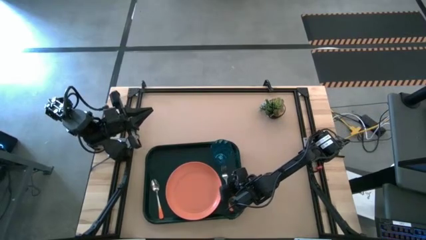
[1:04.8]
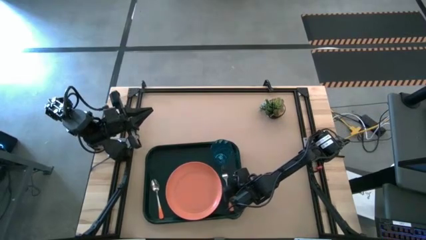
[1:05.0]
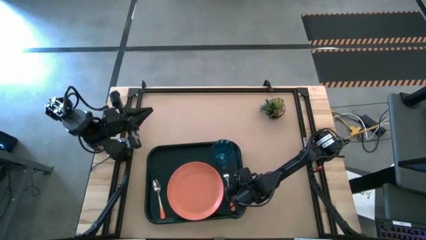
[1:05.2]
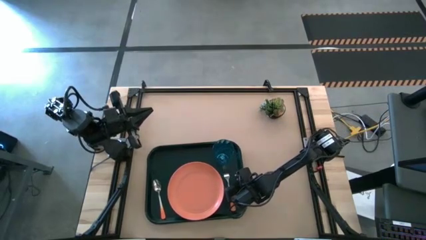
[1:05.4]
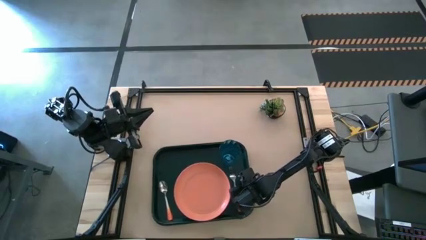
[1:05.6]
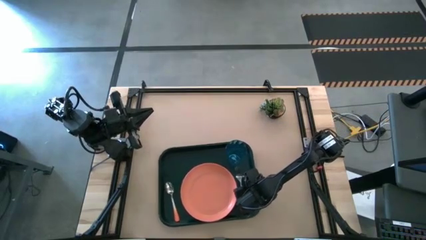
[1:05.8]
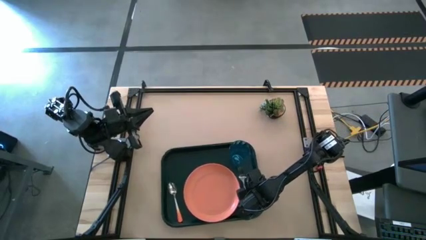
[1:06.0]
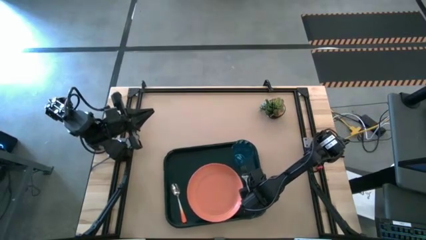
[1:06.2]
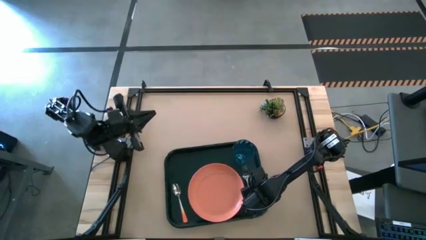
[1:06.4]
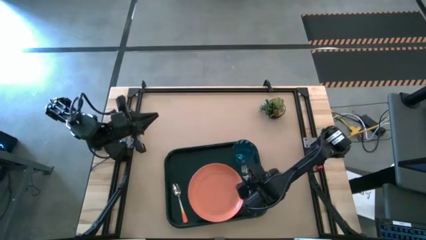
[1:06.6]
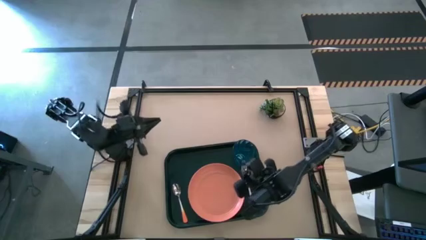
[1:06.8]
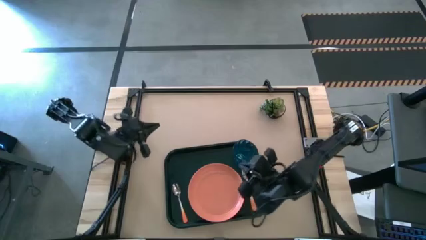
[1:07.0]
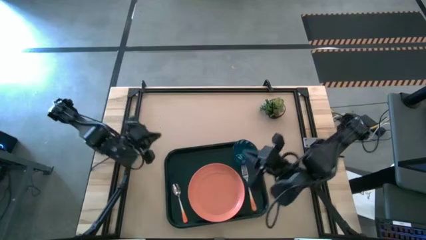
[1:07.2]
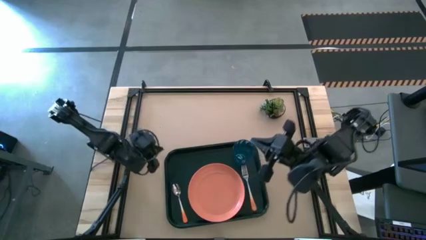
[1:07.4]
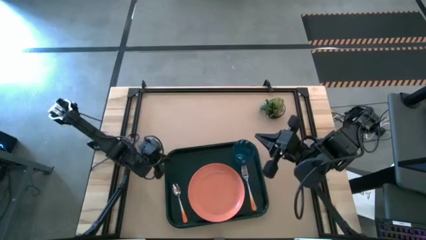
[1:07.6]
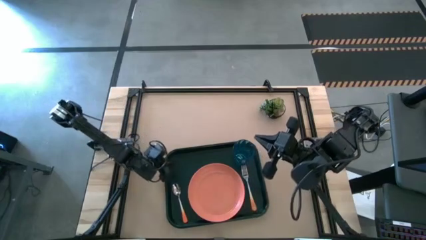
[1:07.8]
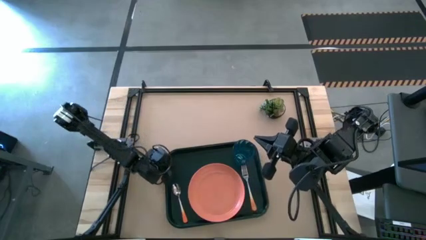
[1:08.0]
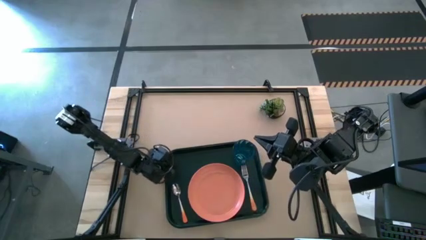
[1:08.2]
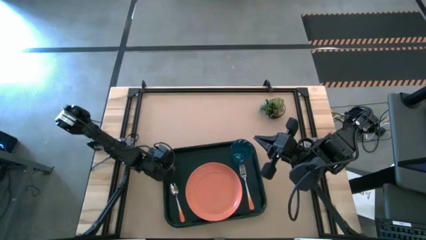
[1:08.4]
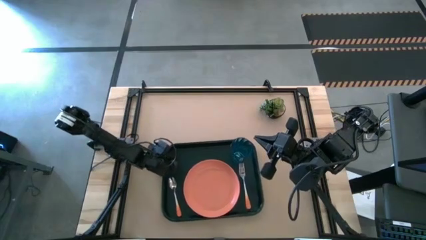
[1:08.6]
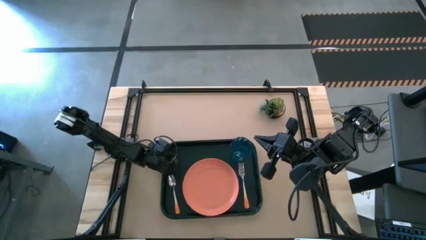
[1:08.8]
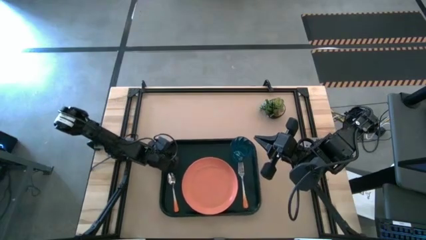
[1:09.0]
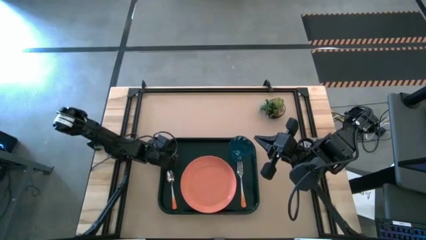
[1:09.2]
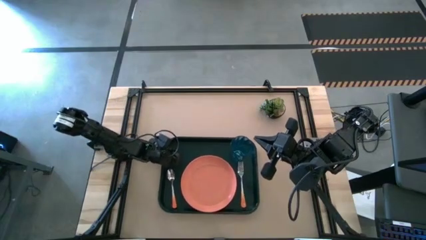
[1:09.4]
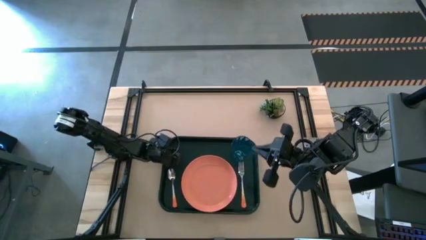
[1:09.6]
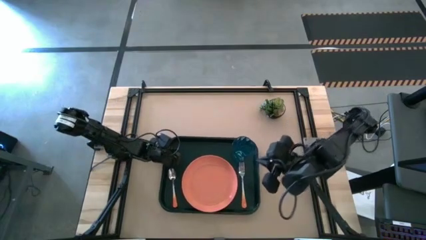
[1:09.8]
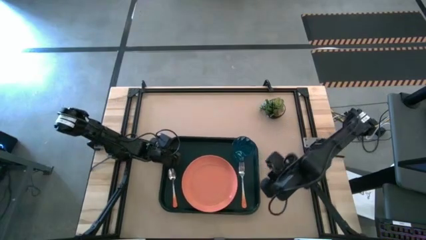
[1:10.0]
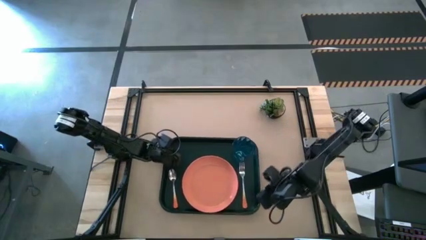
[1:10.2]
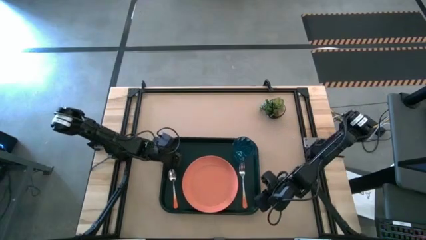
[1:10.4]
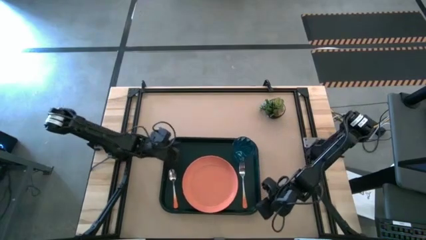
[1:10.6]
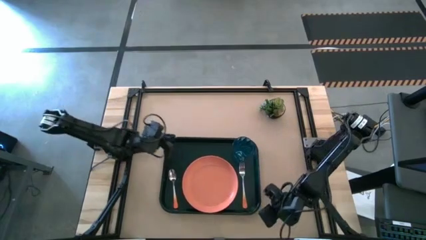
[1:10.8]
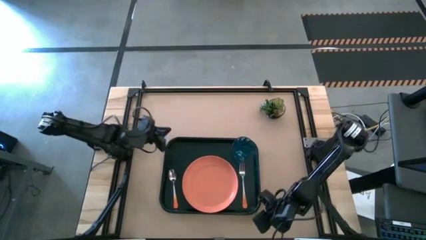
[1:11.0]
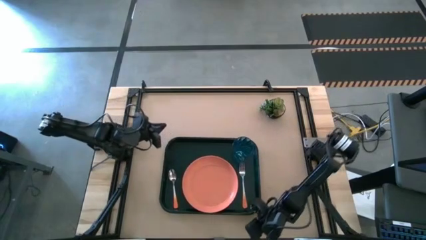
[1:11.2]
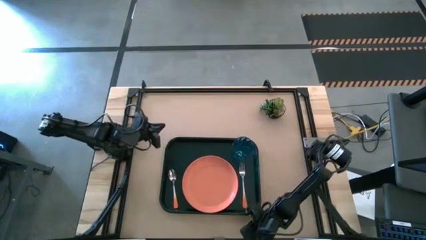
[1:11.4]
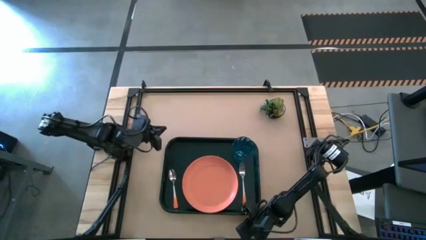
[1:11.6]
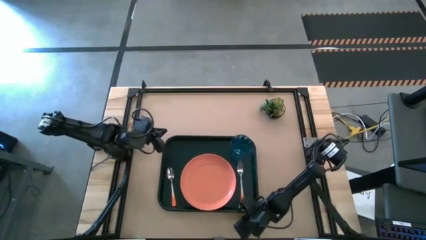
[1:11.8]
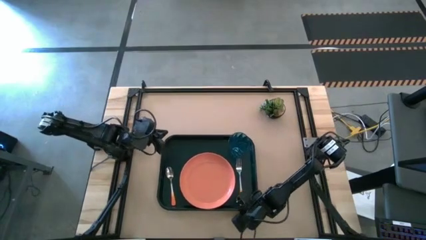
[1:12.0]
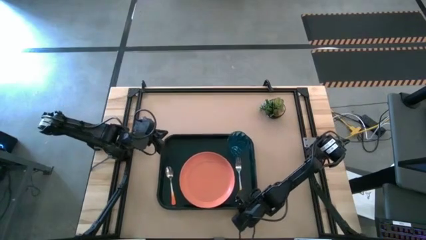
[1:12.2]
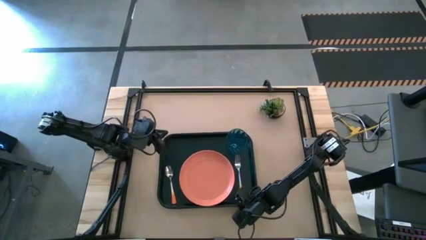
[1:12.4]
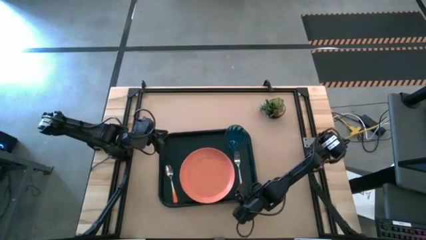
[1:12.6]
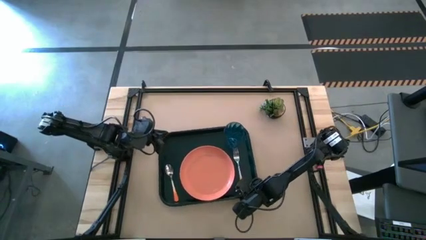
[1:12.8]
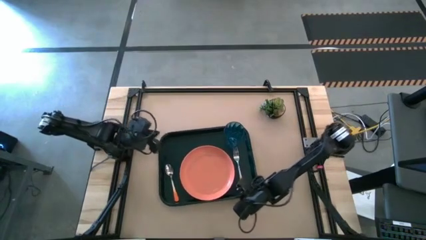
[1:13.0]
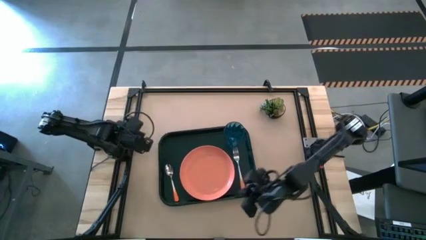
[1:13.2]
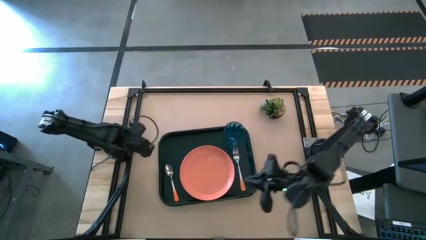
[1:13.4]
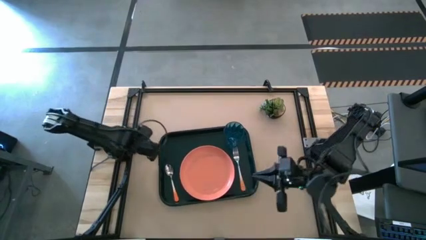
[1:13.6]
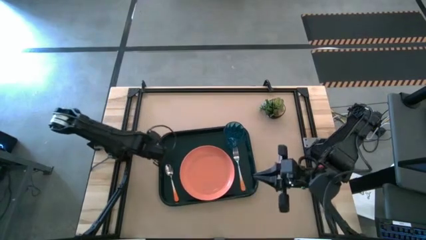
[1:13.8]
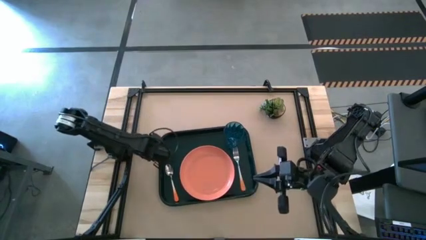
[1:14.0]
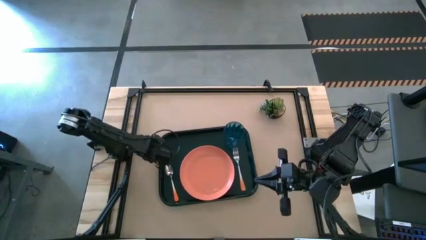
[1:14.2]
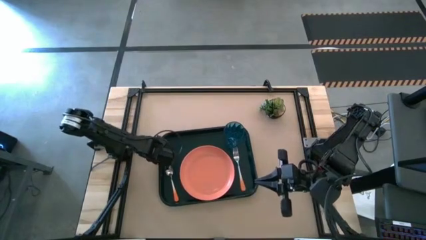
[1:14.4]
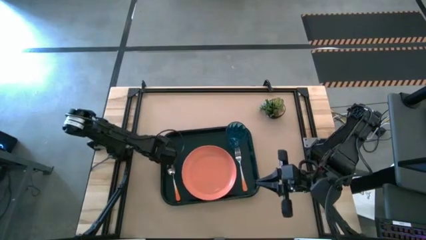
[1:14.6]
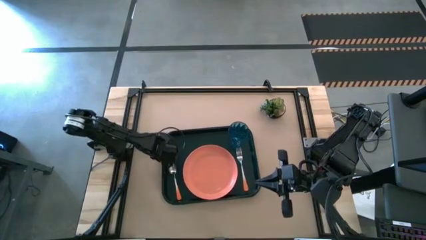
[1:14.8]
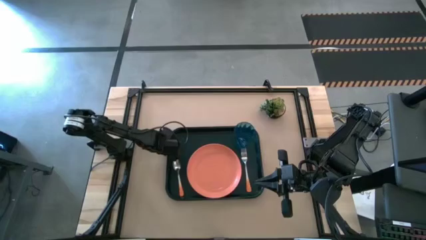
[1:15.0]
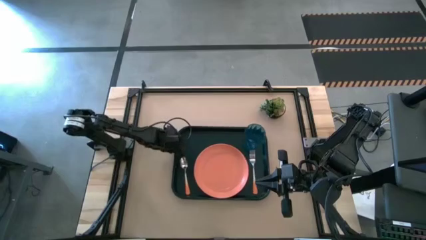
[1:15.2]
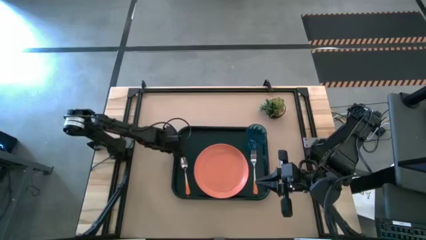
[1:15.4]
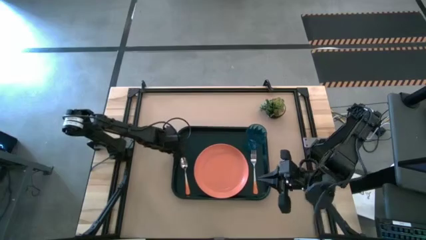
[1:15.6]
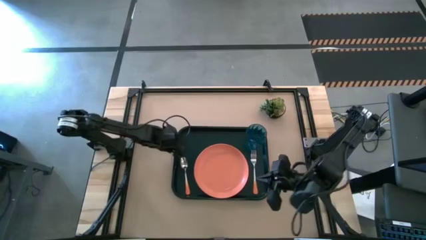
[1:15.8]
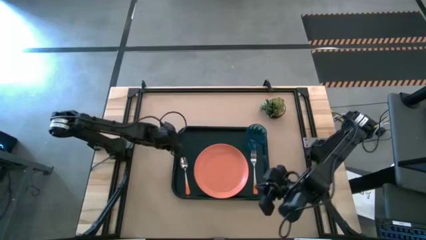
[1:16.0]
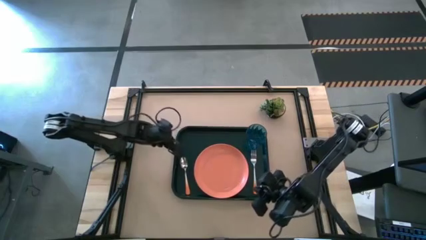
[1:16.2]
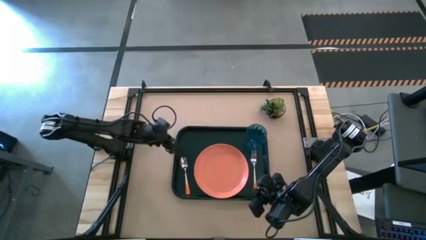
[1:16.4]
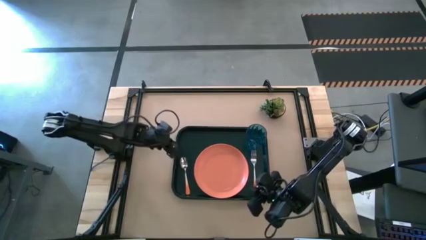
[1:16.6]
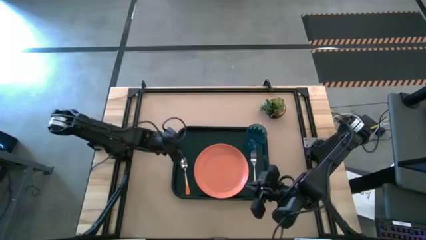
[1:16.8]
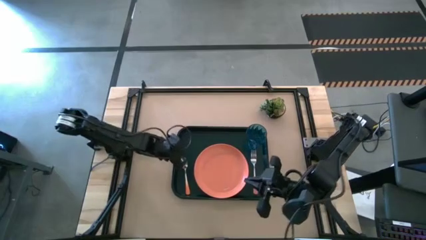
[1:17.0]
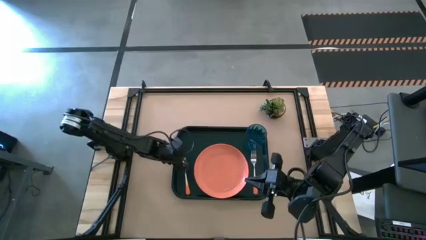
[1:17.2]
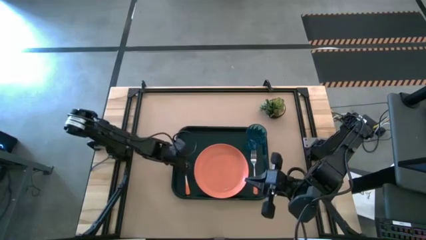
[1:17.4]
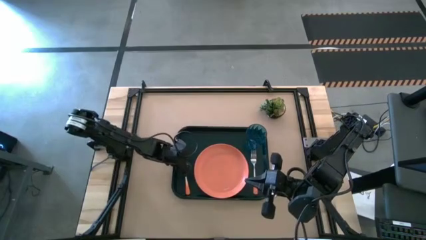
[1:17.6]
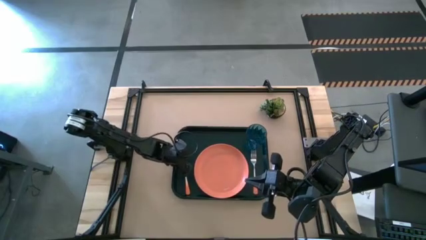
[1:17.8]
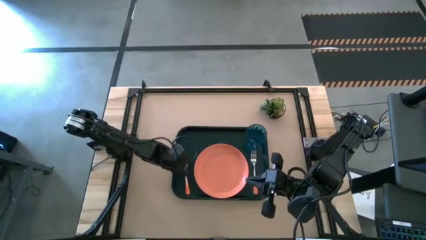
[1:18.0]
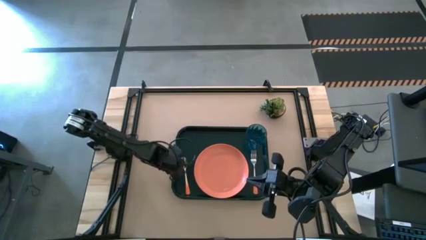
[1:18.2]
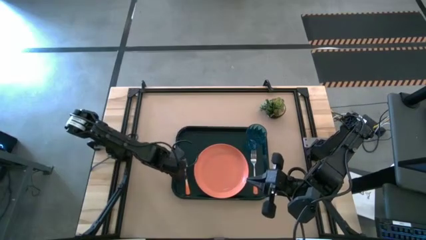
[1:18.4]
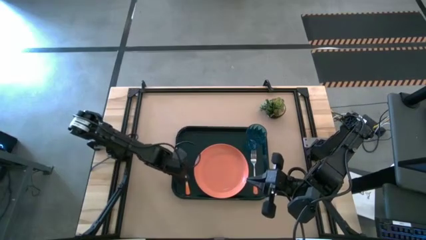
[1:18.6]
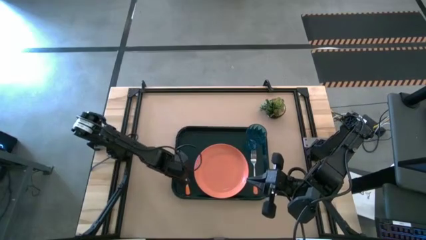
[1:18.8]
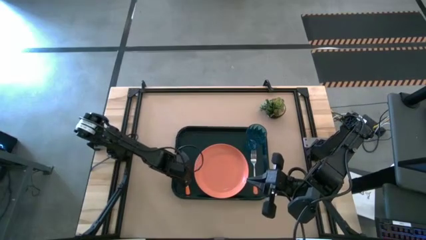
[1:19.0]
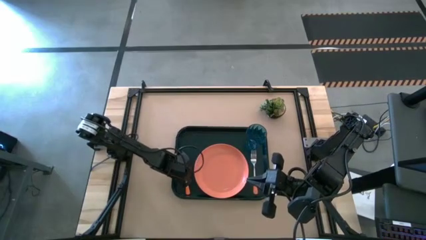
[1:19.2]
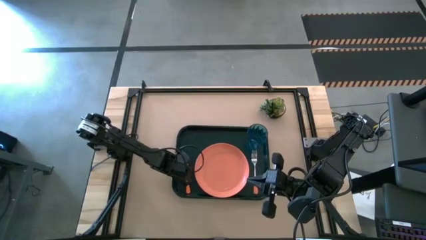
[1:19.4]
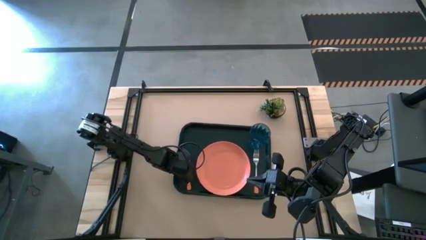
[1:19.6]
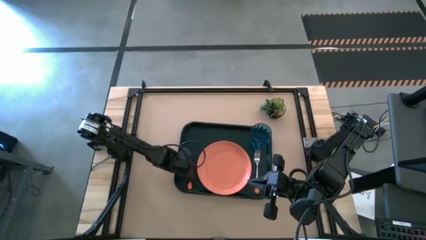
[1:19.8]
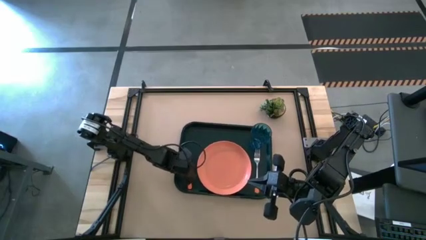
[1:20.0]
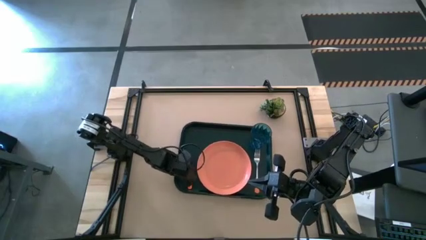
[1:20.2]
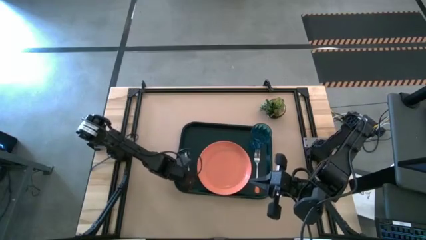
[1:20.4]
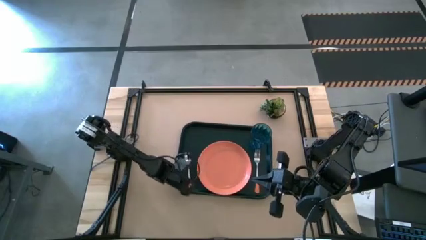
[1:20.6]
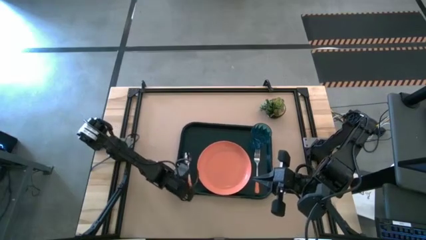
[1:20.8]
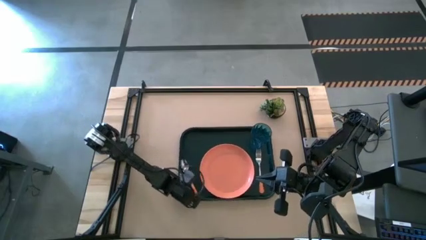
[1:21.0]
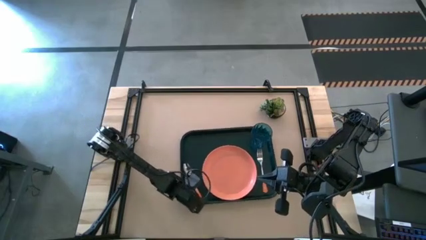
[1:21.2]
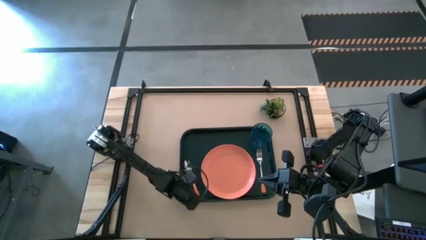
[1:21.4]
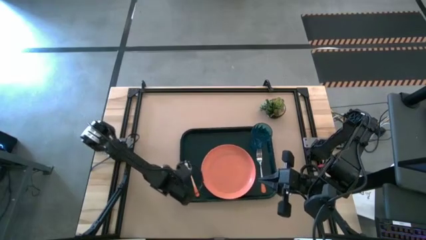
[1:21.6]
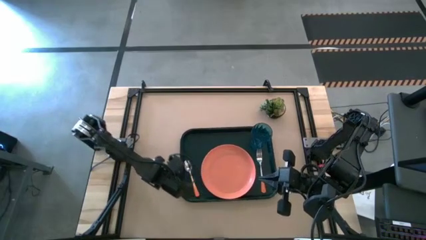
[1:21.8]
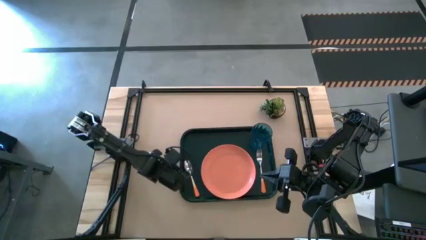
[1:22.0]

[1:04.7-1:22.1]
Task: Pick and place plate/cup/fork/spoon on tray
Move the dark green tray to the center of the table
